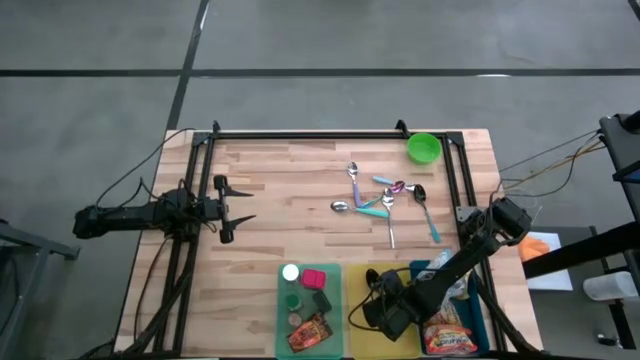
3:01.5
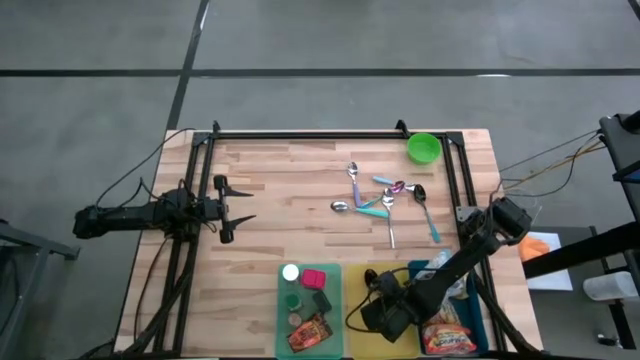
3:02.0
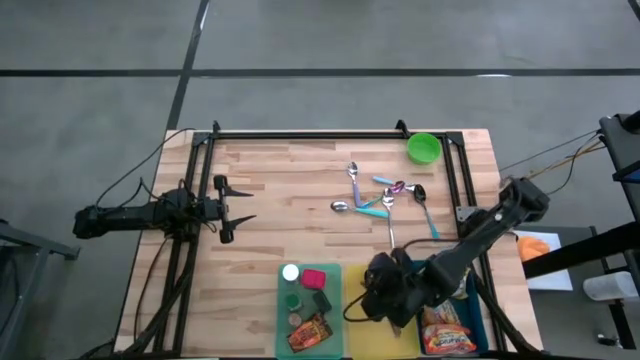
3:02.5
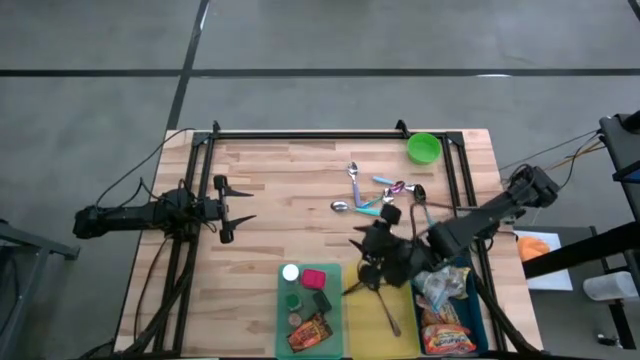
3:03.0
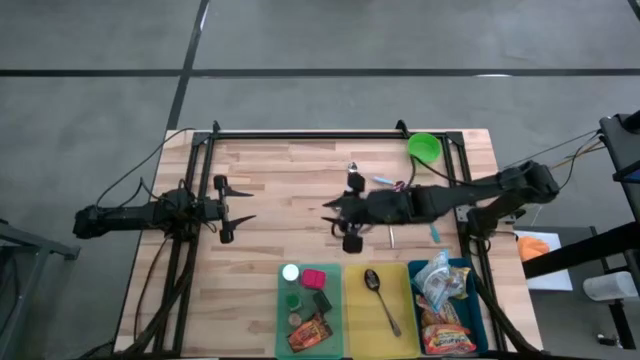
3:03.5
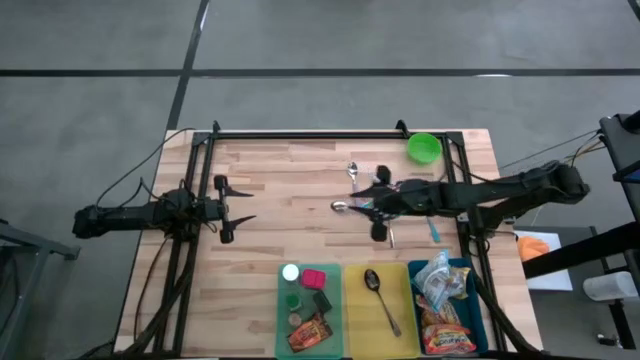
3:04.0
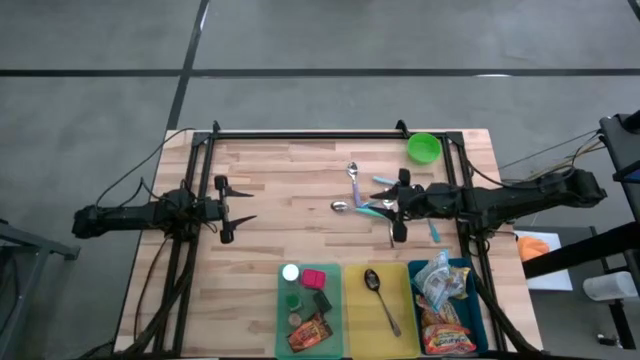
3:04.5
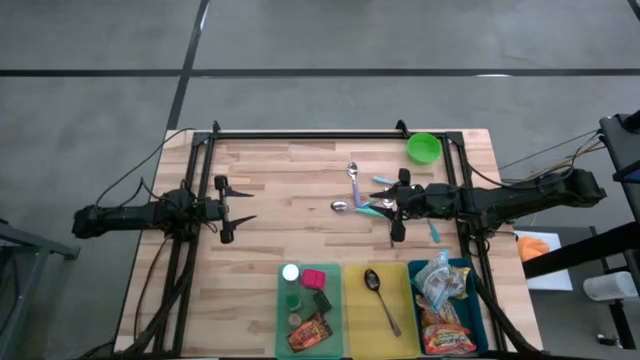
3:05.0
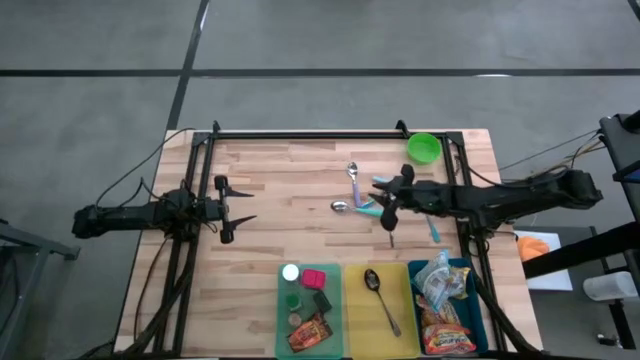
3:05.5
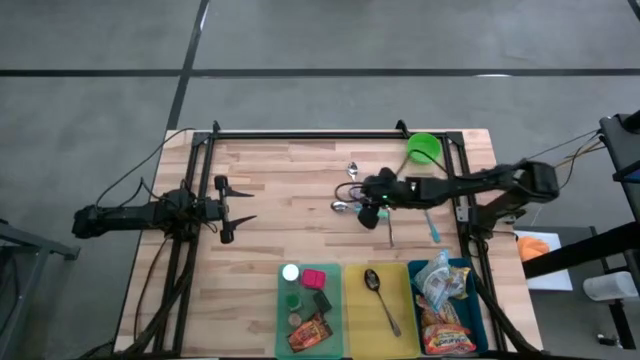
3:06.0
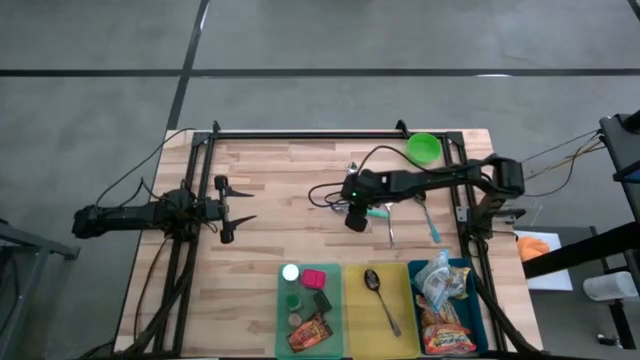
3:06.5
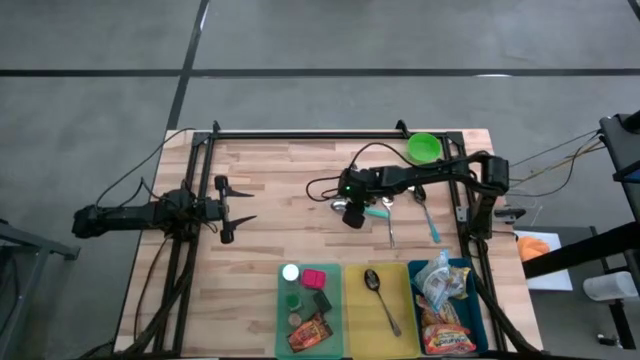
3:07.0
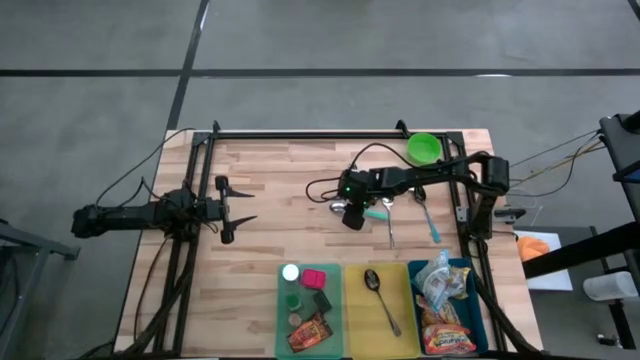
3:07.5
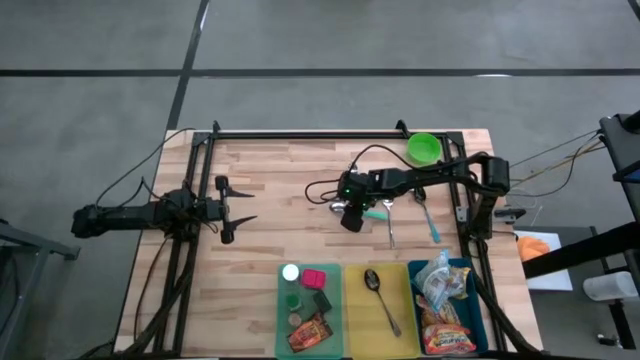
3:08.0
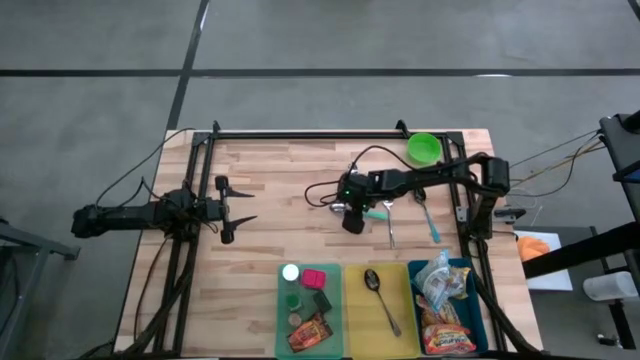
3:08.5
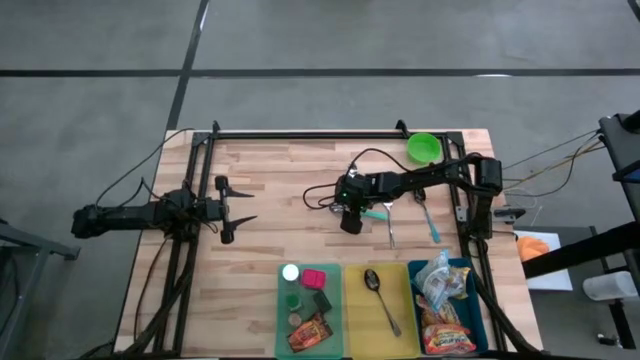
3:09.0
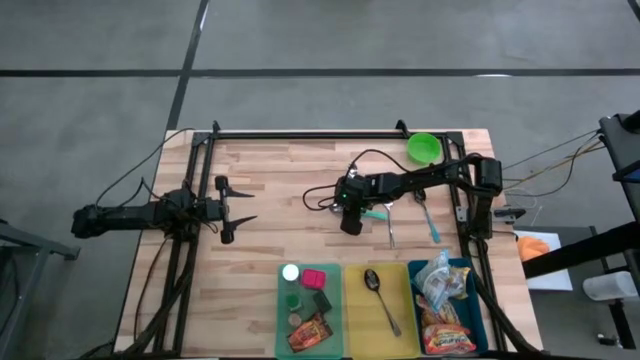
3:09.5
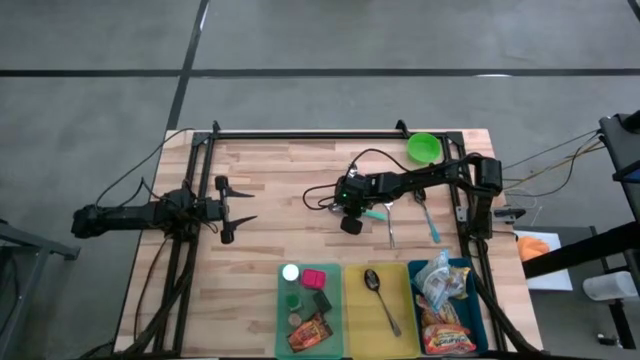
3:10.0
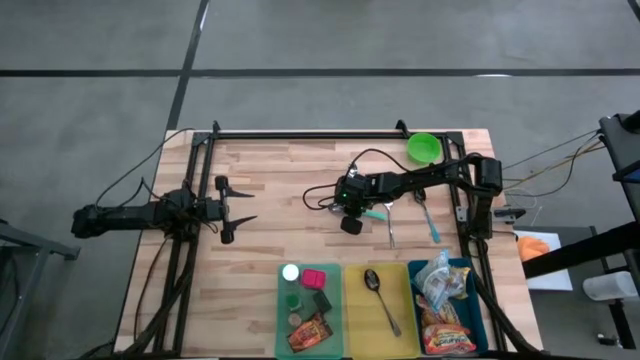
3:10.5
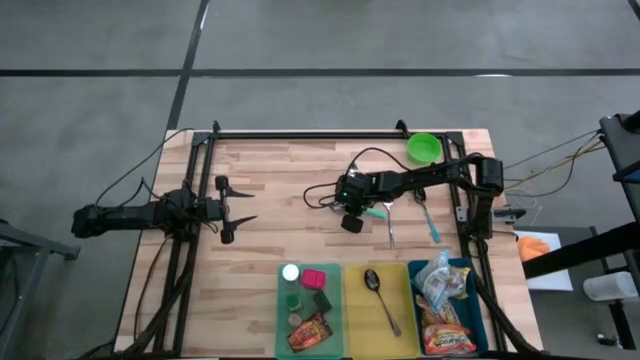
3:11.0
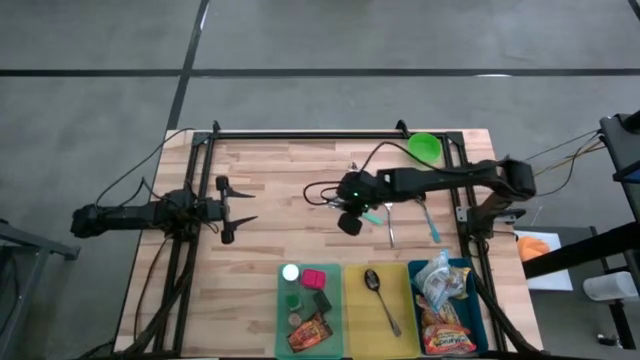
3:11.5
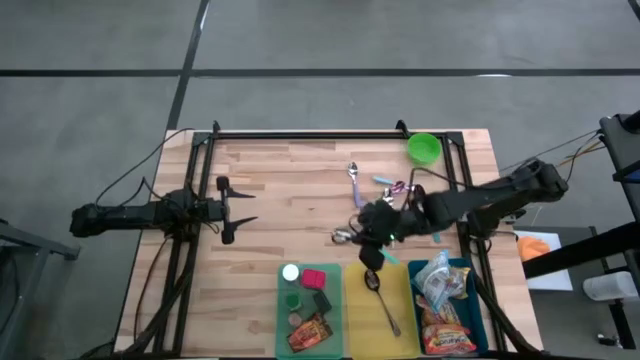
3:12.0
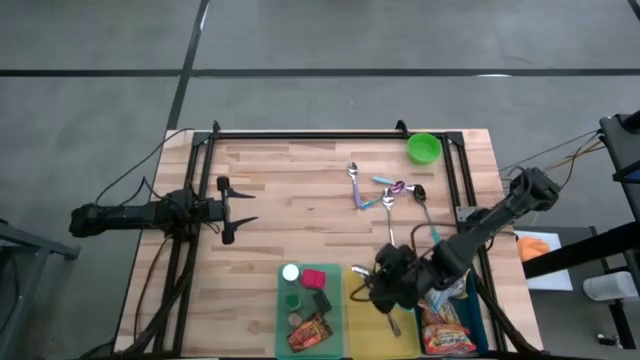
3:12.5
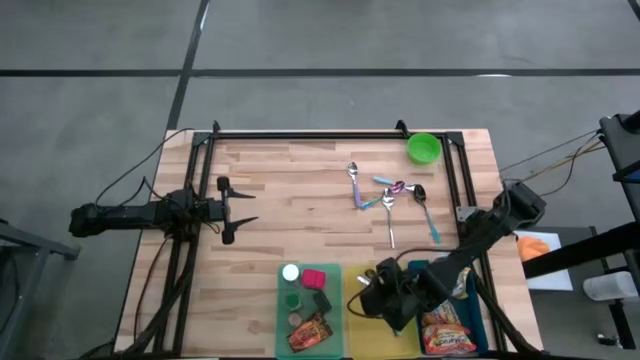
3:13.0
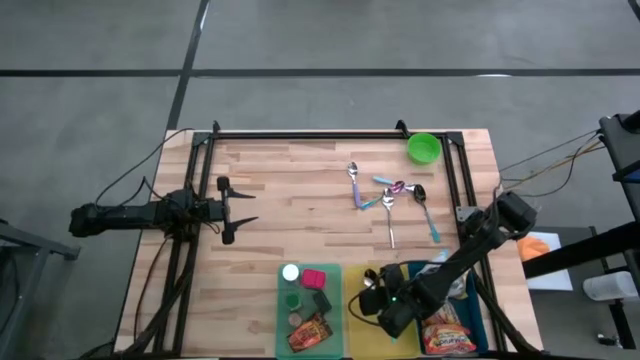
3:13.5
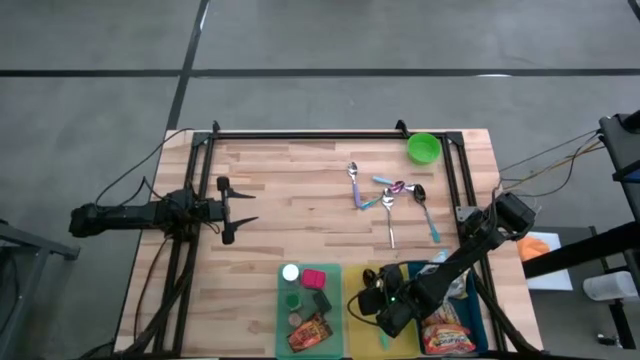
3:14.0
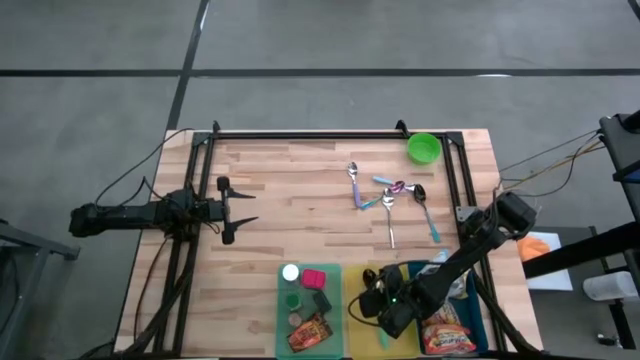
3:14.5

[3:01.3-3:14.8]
Put the left blue spoon into the yellow bin

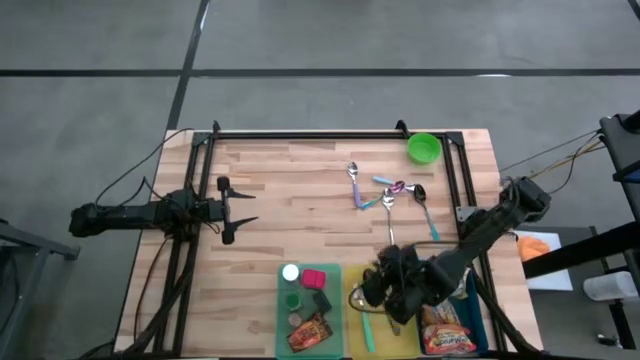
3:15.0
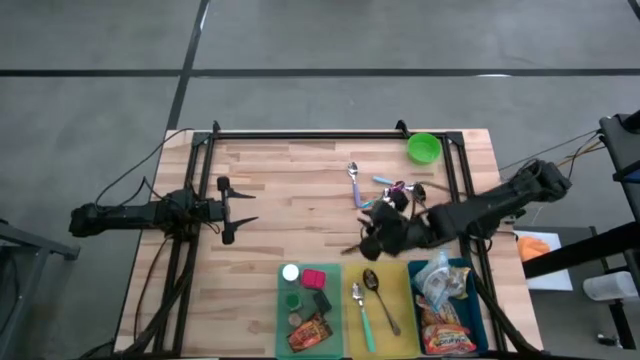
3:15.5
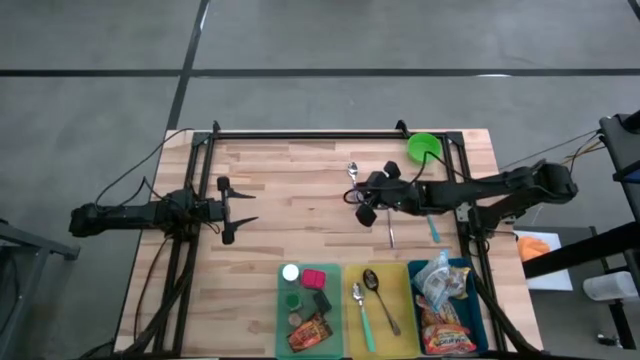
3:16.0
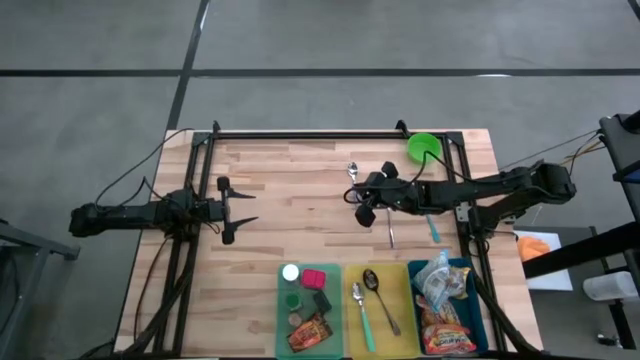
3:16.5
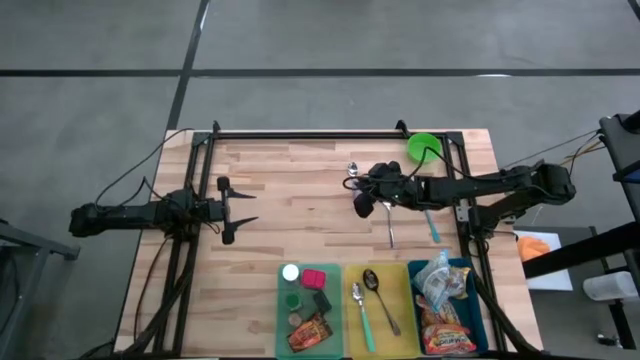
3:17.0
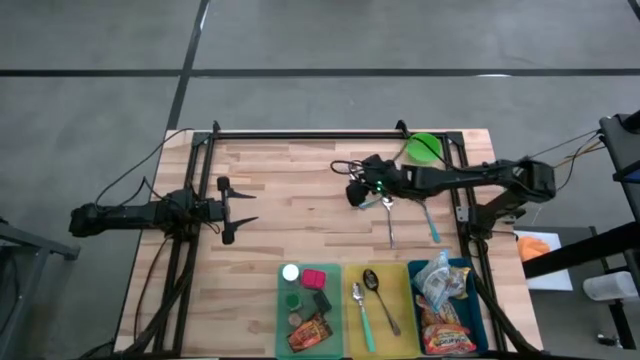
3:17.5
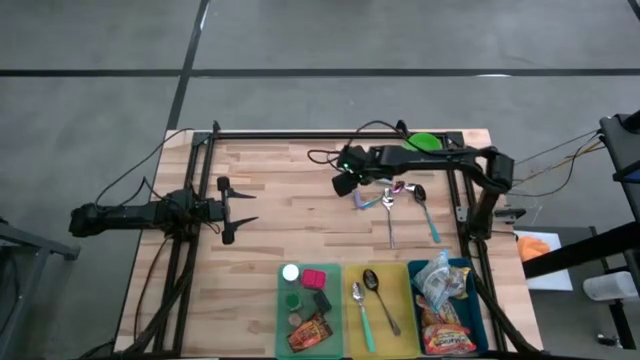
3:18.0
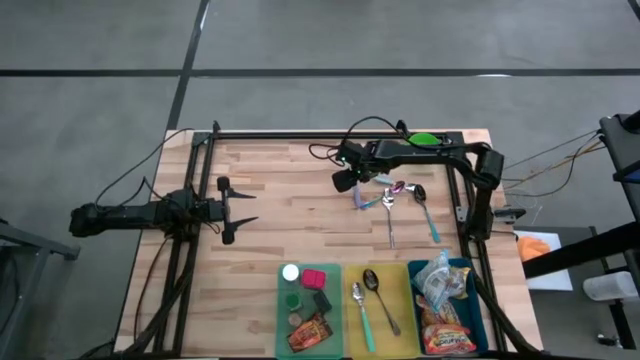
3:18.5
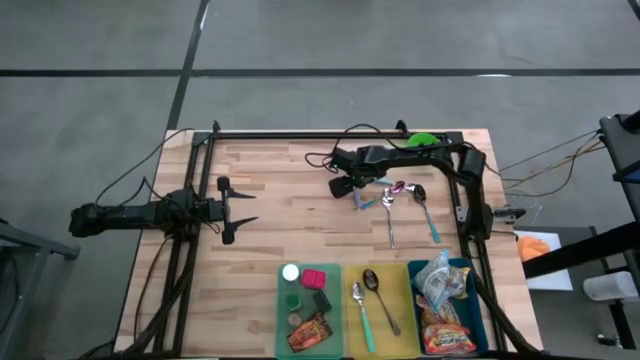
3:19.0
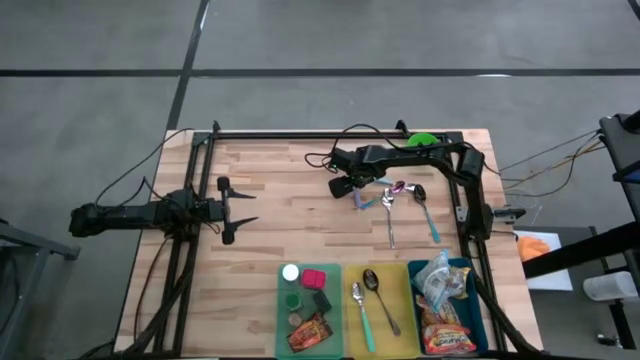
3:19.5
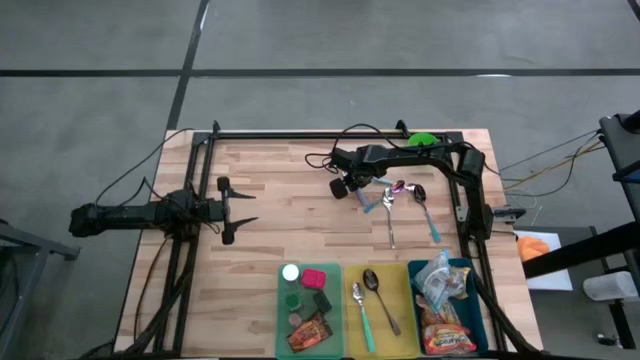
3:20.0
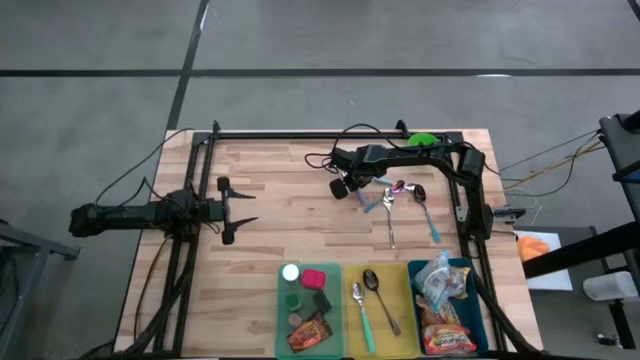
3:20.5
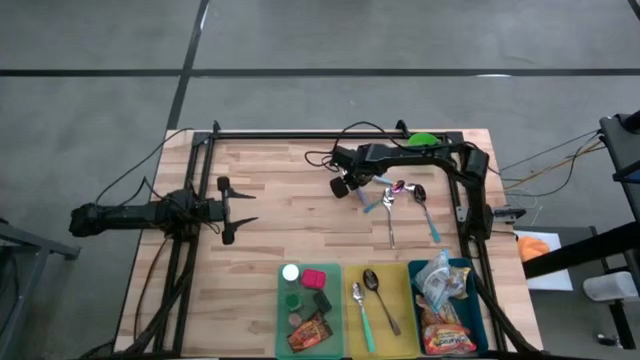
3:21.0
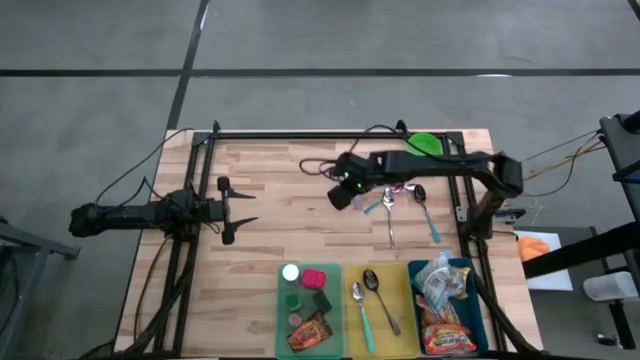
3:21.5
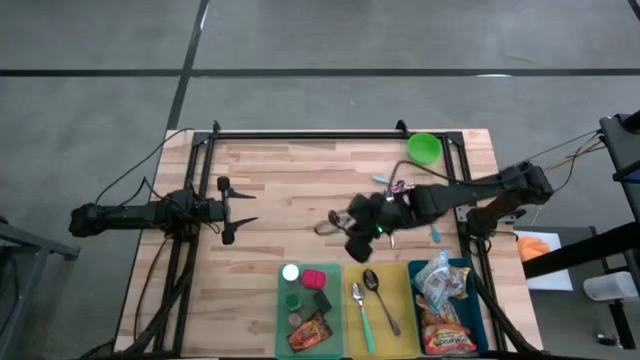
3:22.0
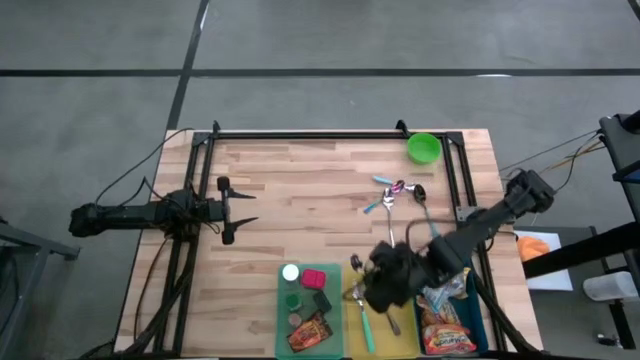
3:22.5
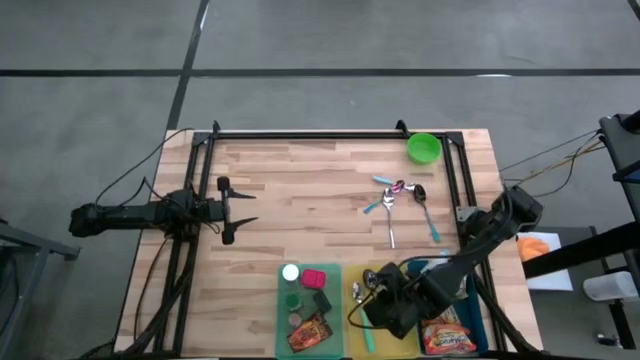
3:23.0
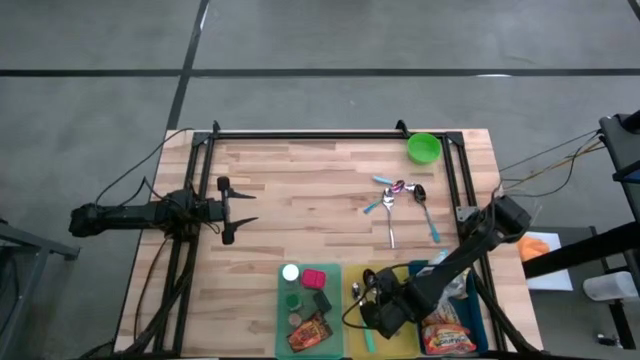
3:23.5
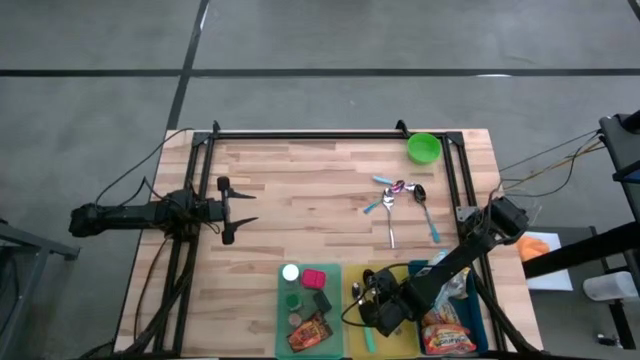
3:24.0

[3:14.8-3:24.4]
Put the violet spoon into the yellow bin
